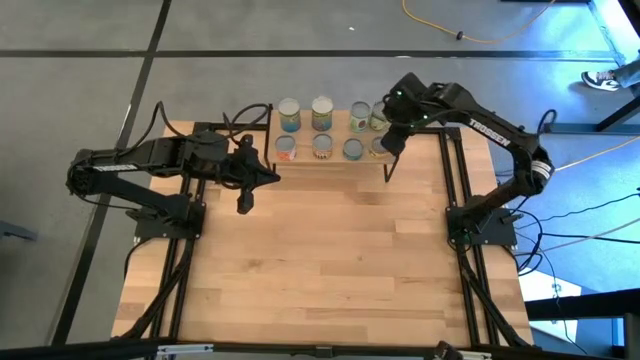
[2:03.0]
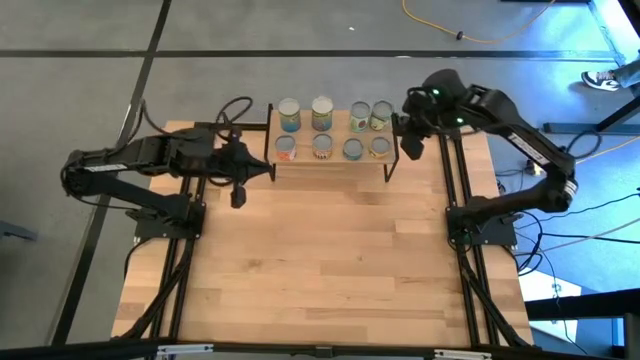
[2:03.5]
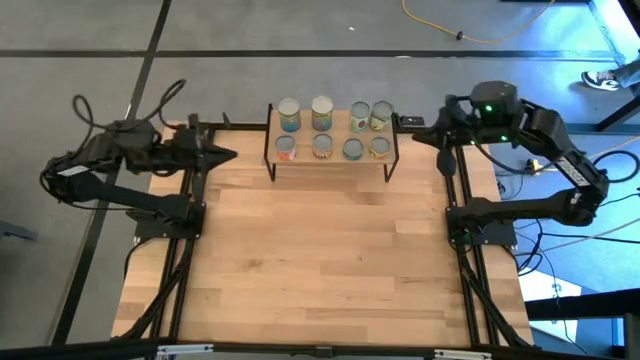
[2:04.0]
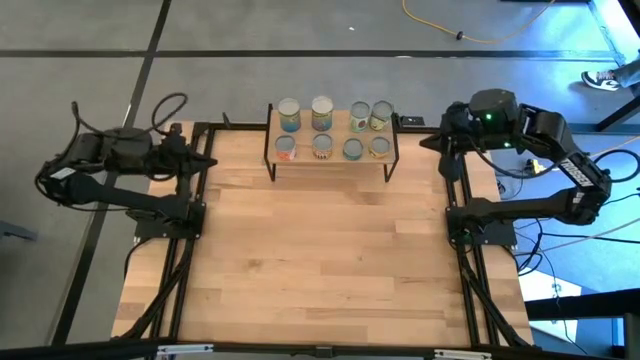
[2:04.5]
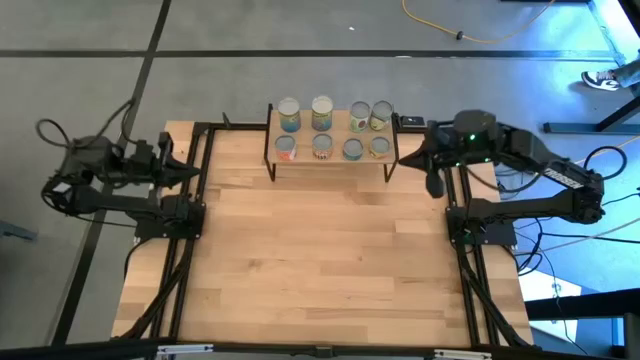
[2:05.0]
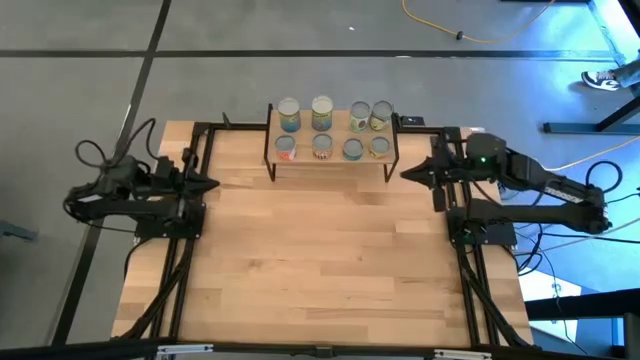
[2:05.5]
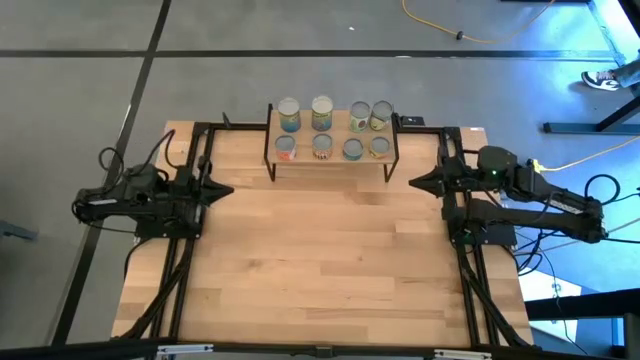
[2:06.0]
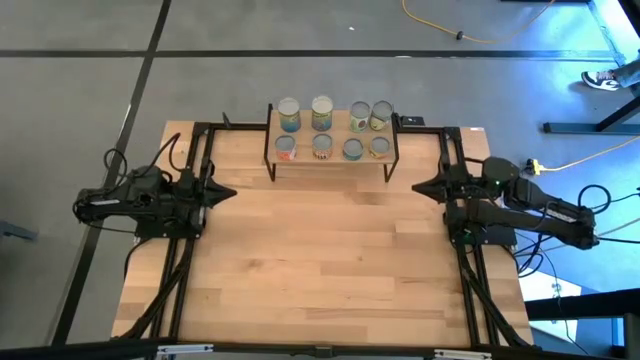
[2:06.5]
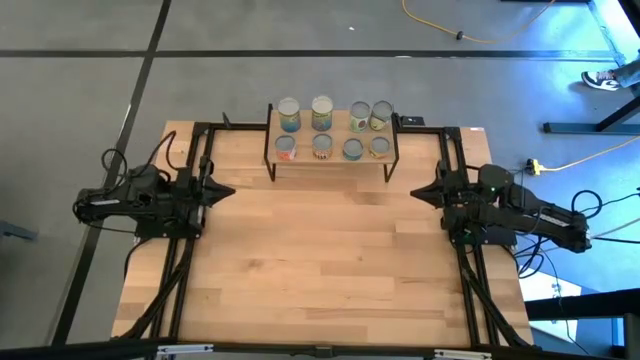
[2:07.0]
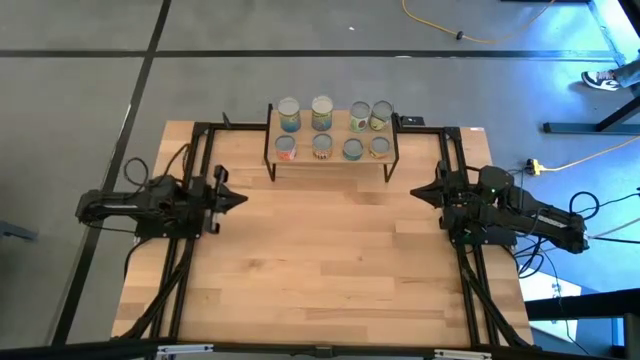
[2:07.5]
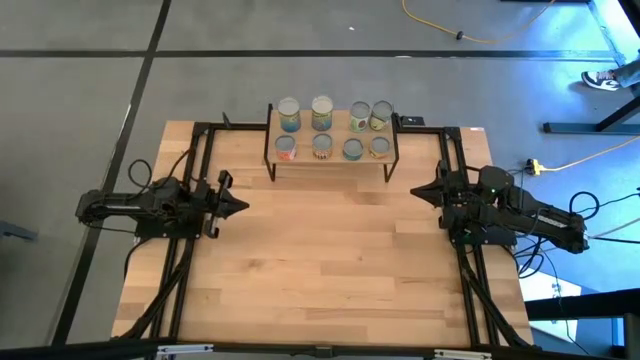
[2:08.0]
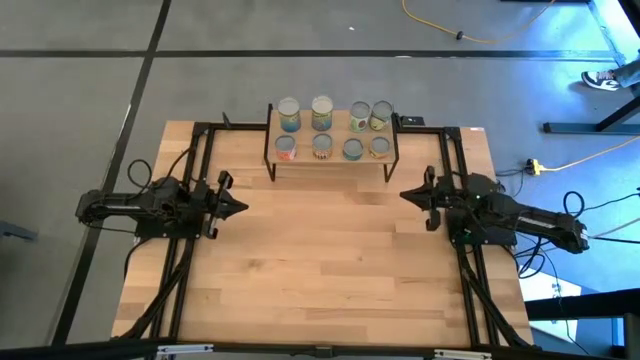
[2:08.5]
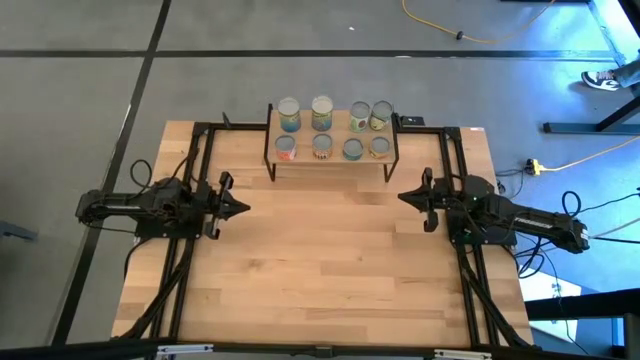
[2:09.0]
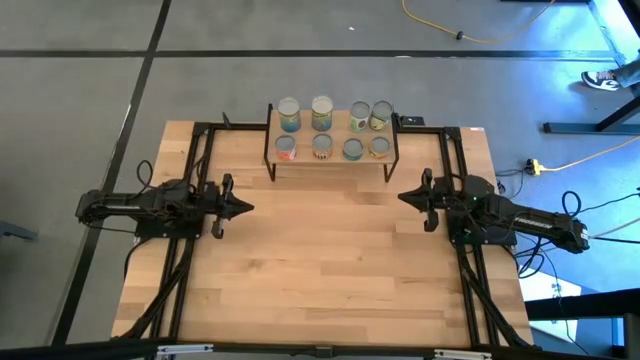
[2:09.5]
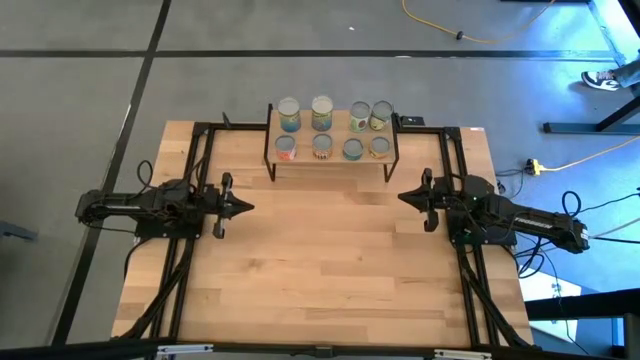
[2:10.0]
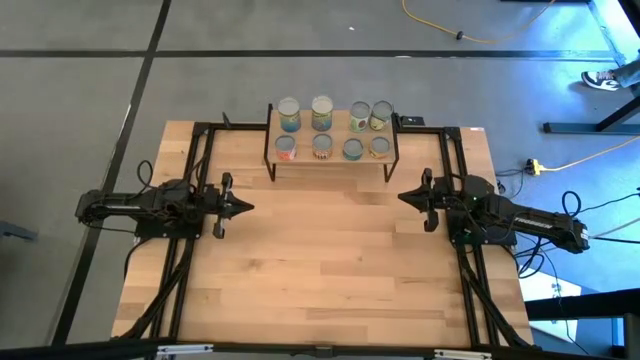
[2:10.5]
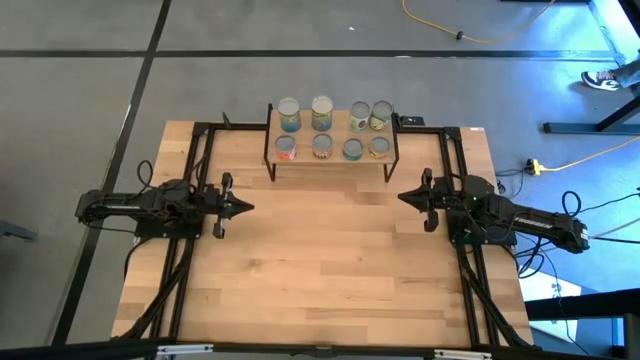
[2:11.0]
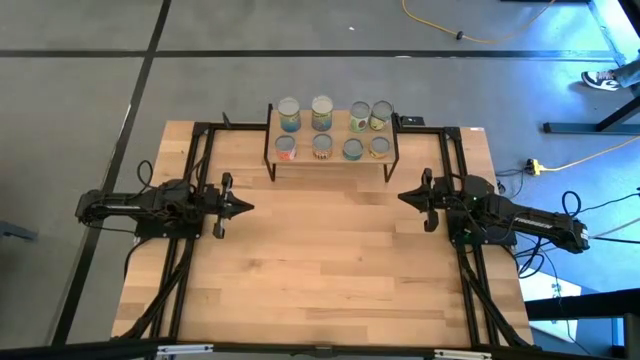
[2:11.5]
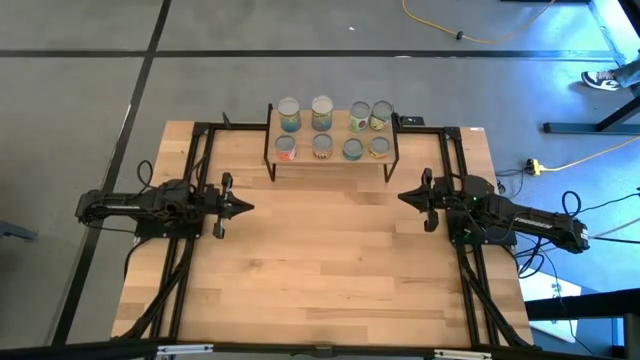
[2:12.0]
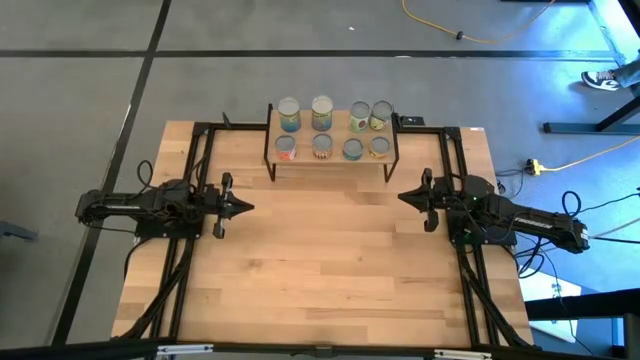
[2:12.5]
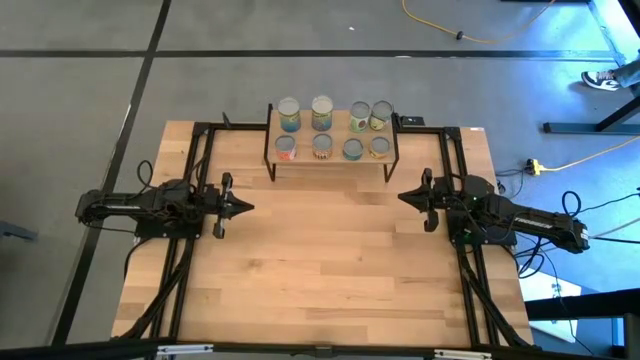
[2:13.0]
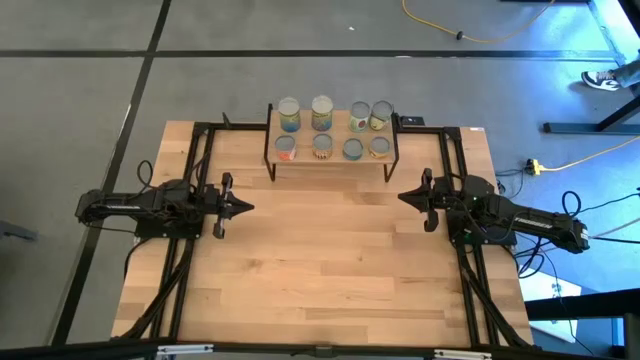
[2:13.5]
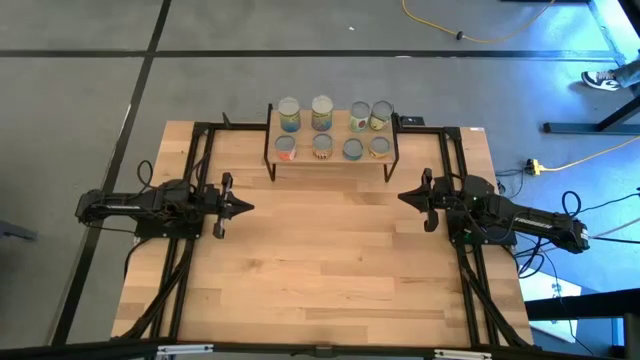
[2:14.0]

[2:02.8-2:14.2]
Task: Pick and place cans onto a shelf
Return to Home Position

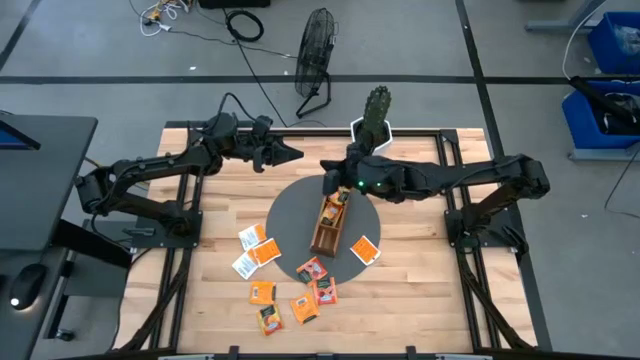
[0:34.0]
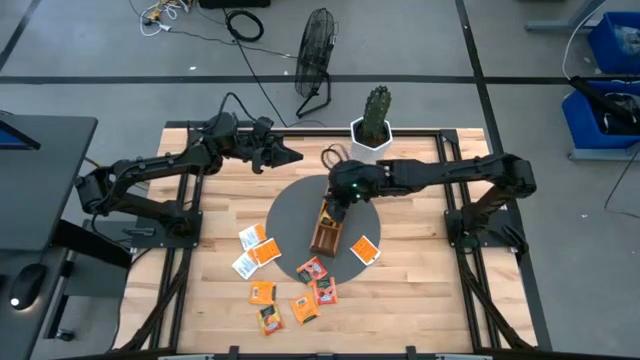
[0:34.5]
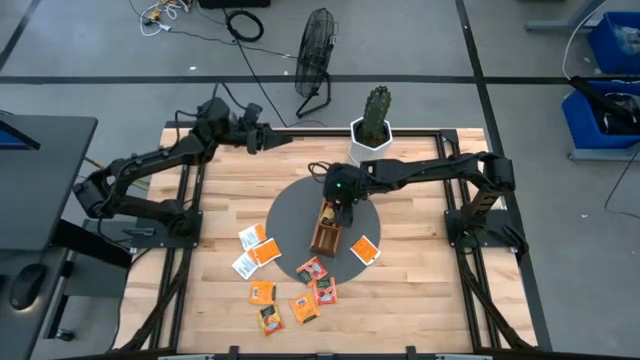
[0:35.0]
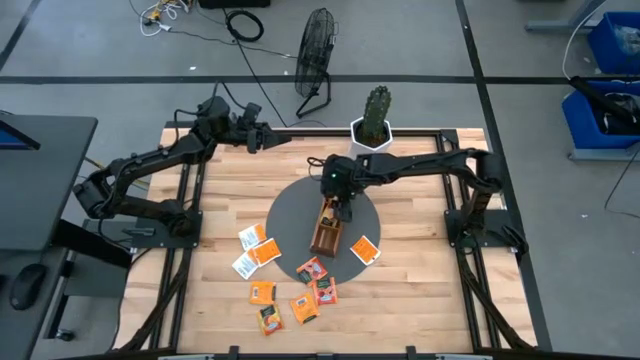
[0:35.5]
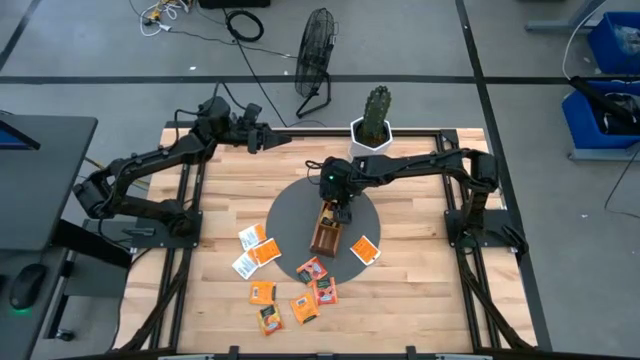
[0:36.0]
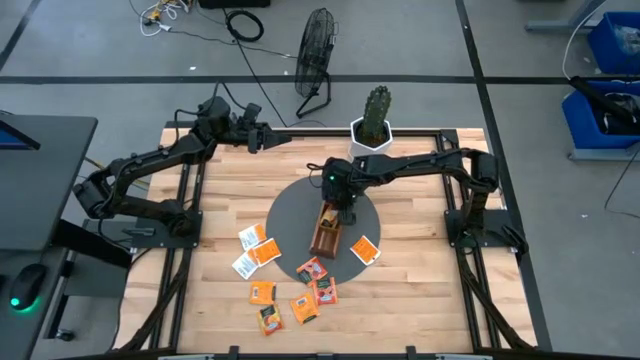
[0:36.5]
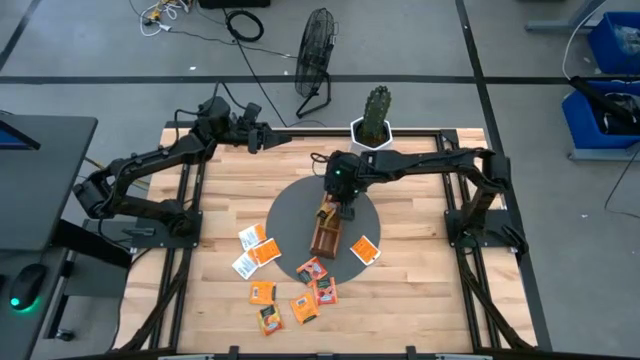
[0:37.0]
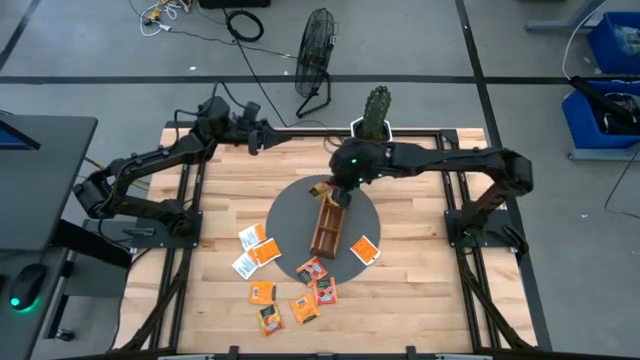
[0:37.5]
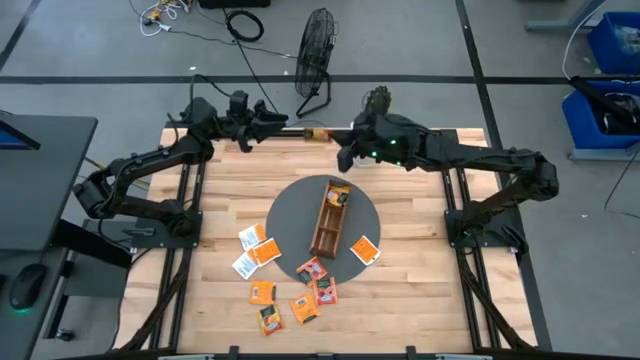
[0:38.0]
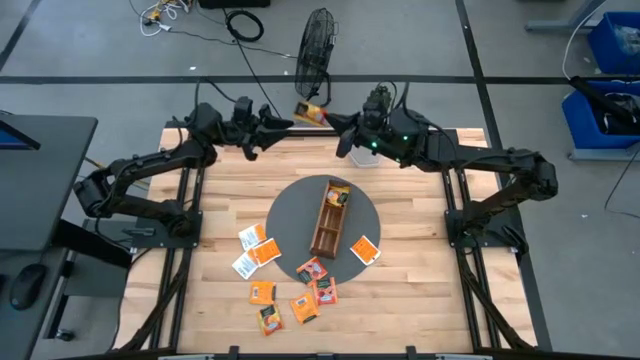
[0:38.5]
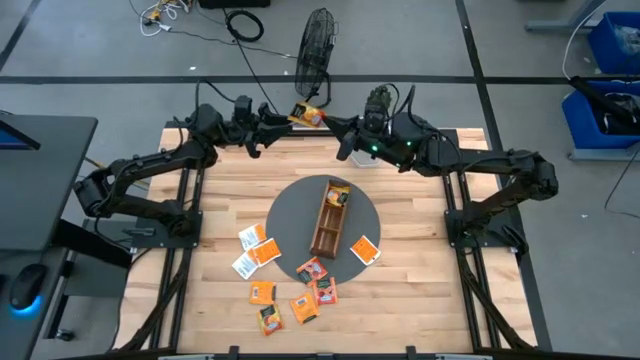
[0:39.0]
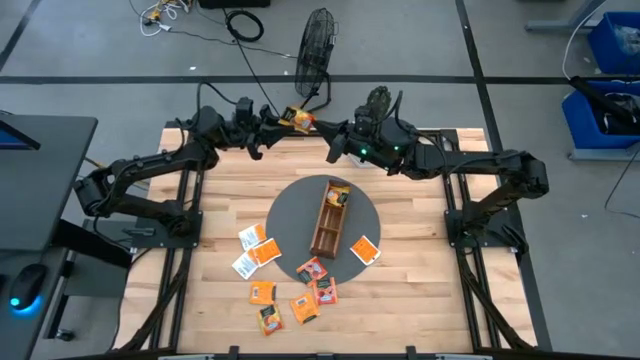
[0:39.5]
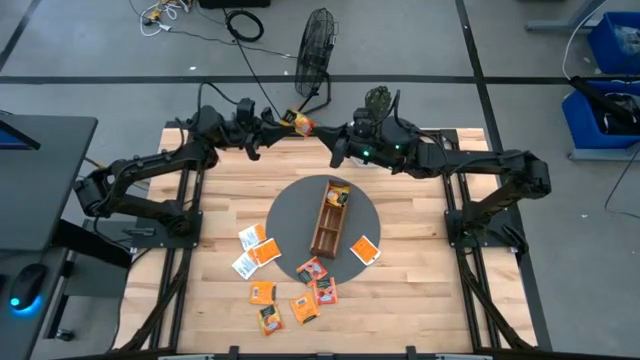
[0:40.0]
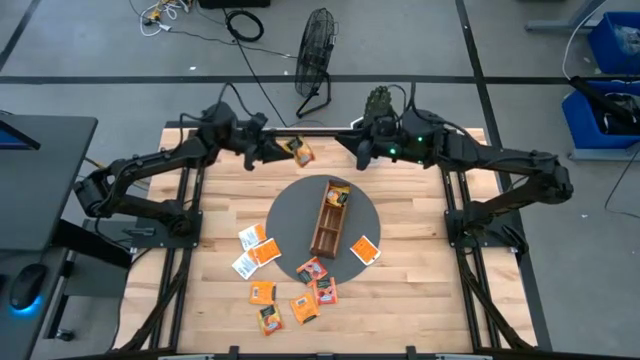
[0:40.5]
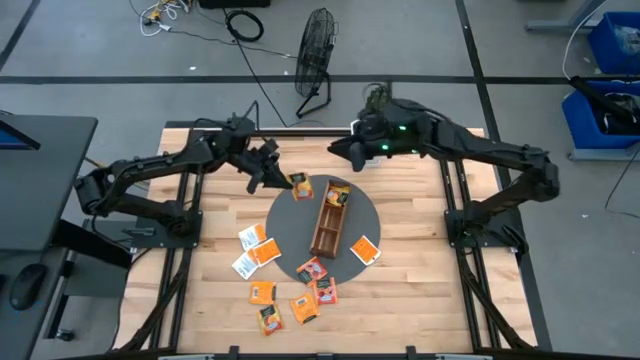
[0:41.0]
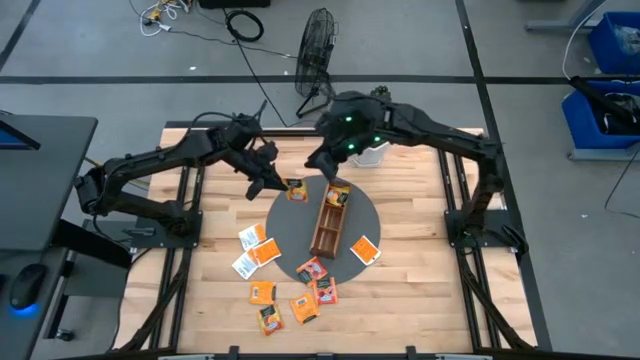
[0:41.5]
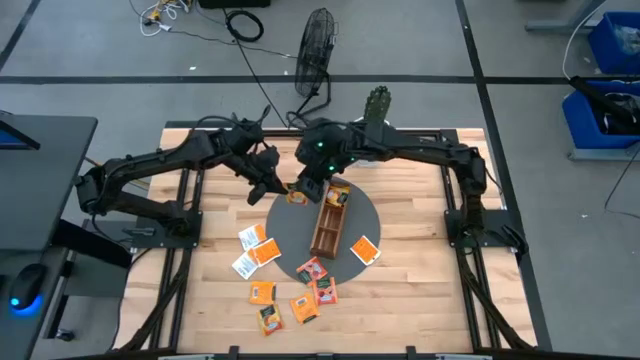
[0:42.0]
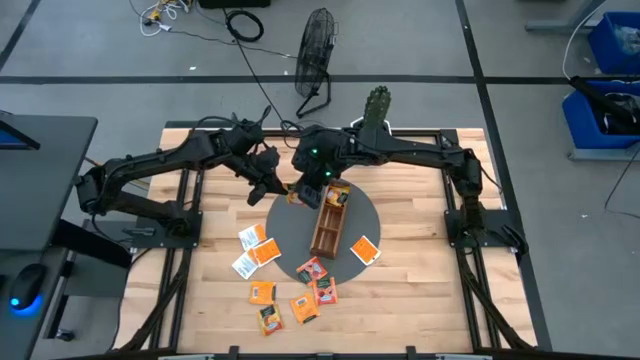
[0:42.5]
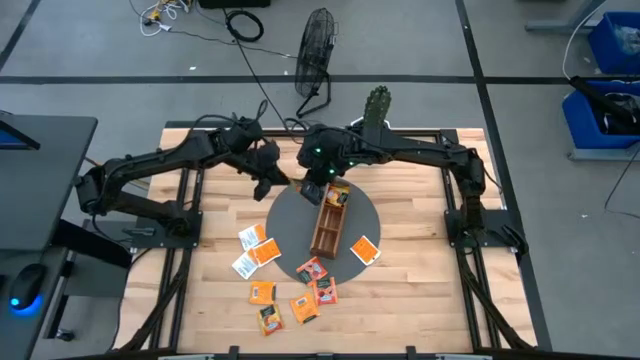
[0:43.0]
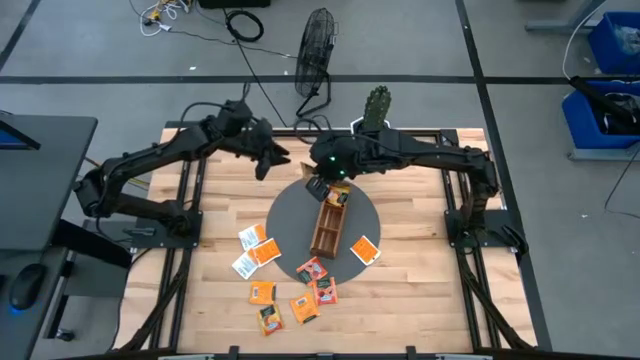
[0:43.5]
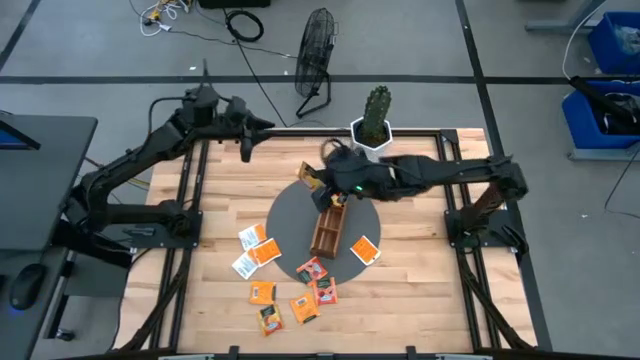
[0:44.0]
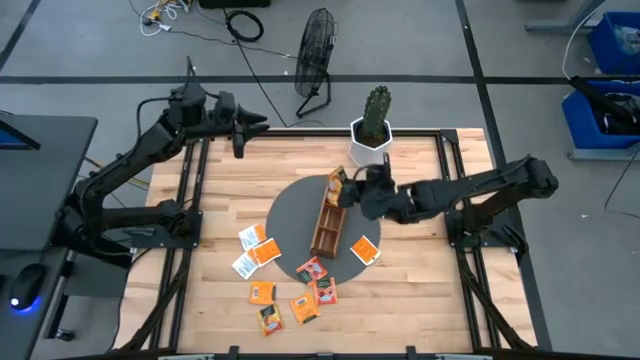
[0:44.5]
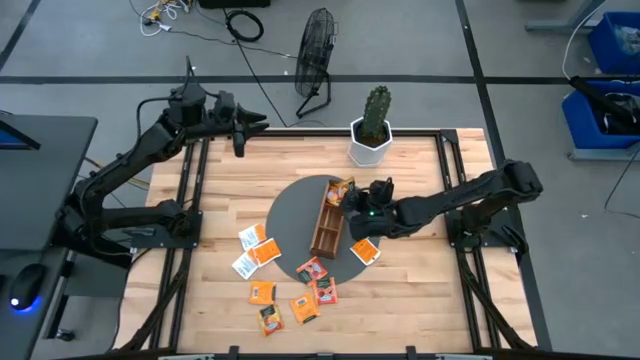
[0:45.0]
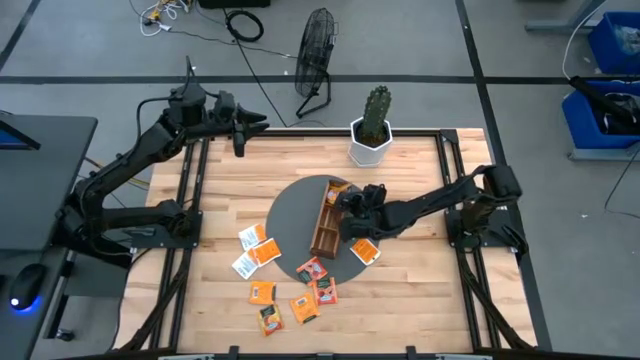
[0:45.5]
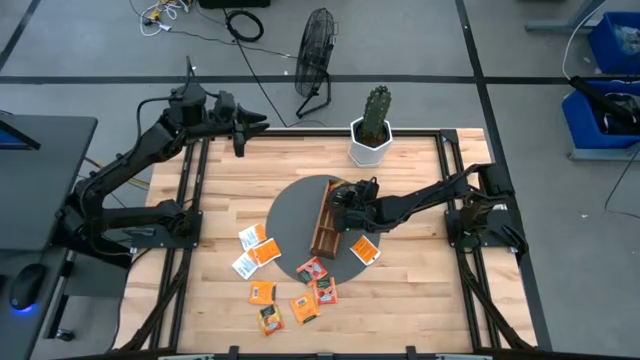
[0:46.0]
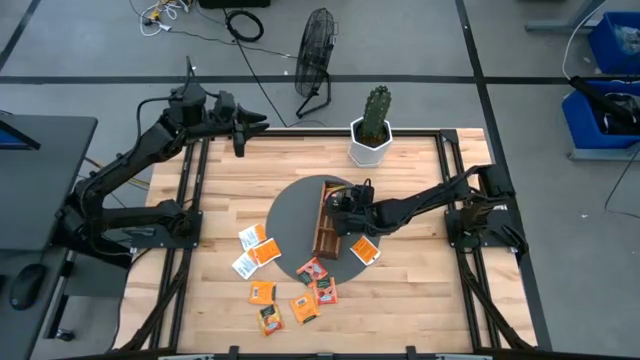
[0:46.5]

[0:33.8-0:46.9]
Task: Pick & Place Tea
Put the orange tea bag into the top section of the wooden organizer
